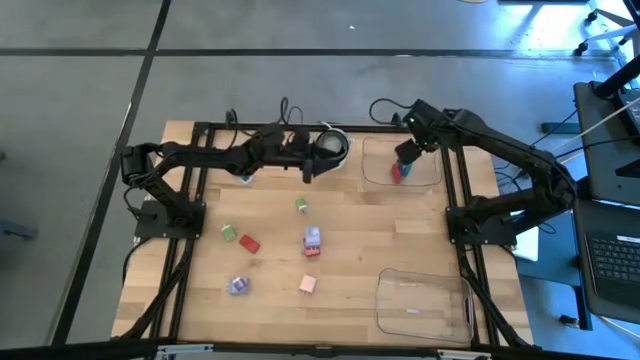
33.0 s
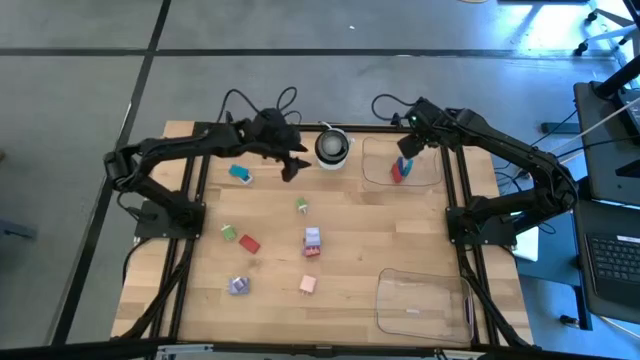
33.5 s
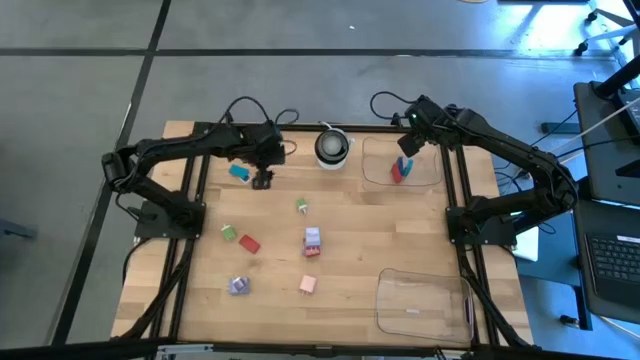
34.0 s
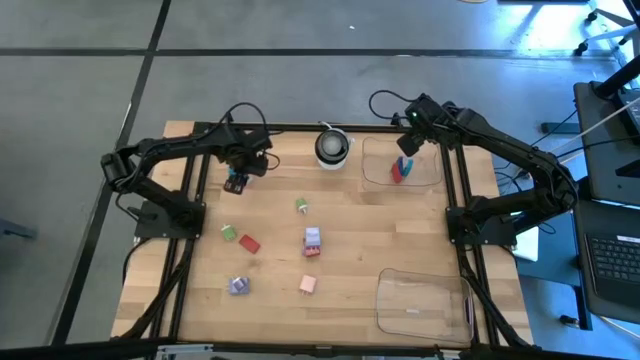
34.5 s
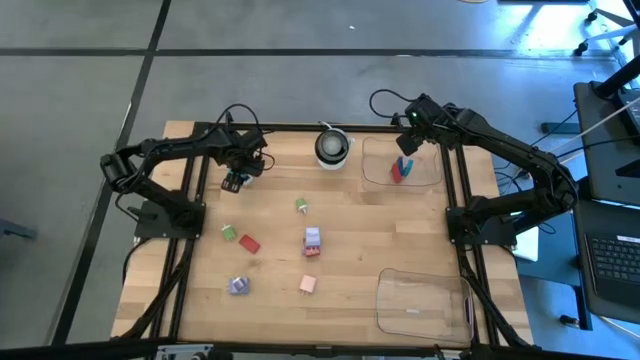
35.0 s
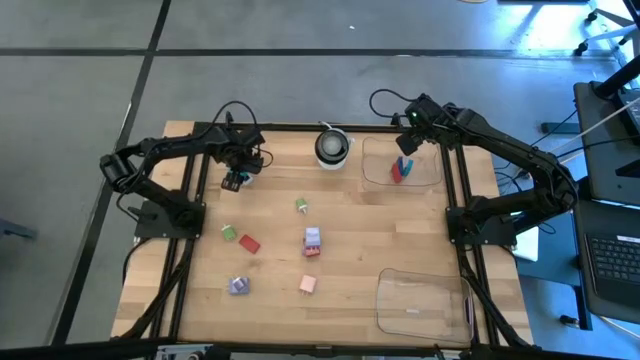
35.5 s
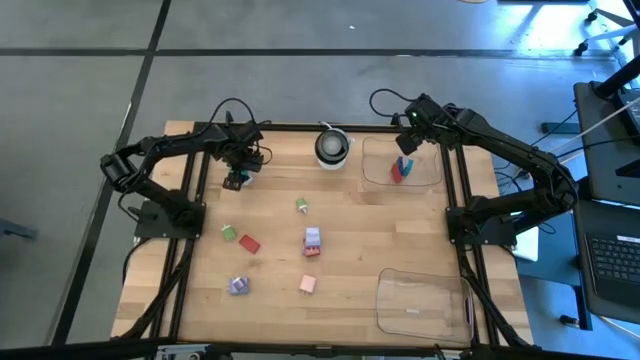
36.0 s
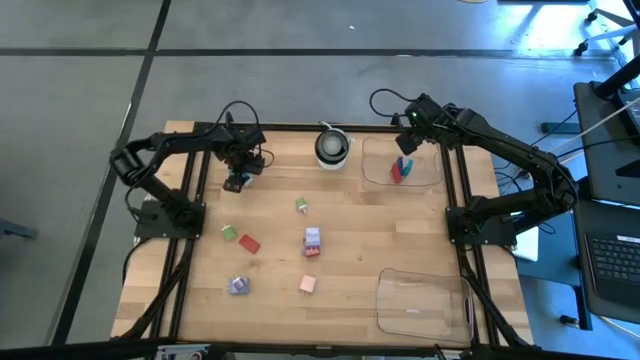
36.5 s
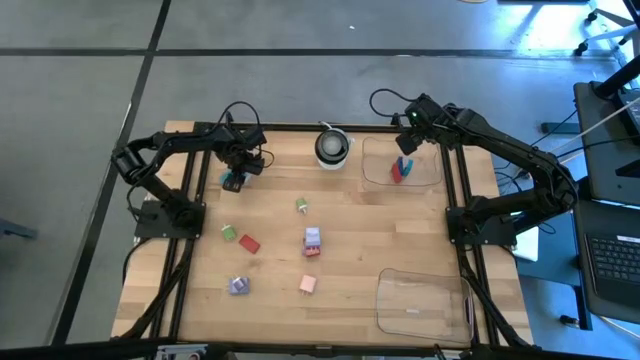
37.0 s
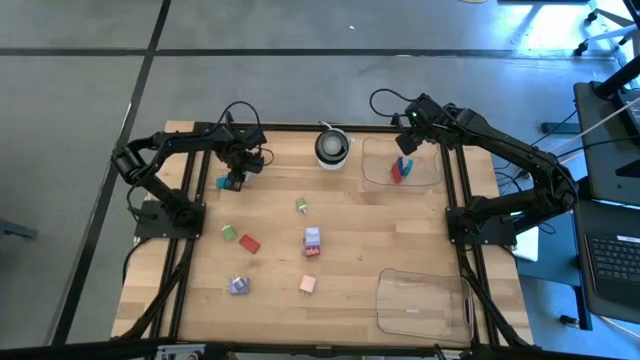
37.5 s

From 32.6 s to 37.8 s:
Task: Pick & Place Office items
Put the light blue digital timer into the top transparent bin

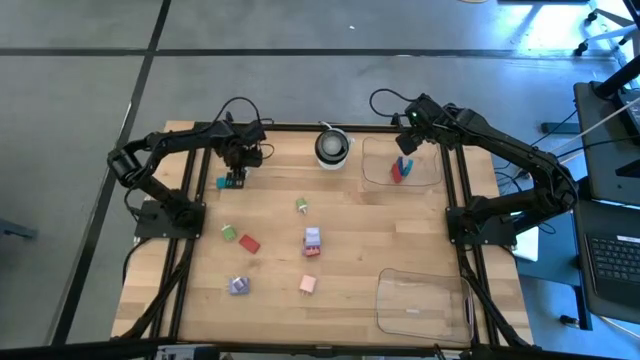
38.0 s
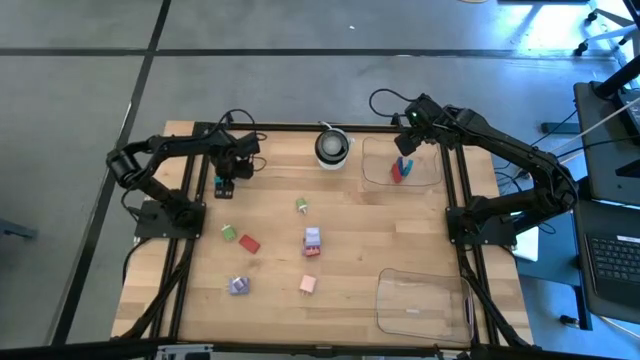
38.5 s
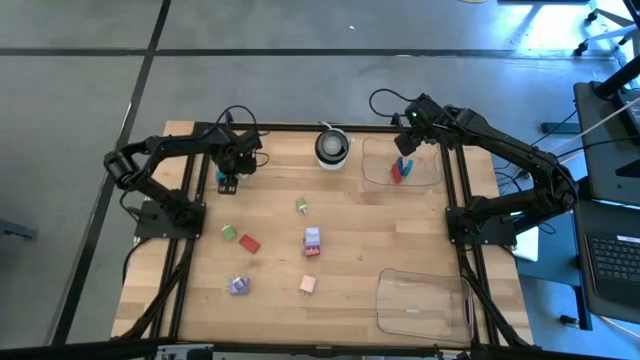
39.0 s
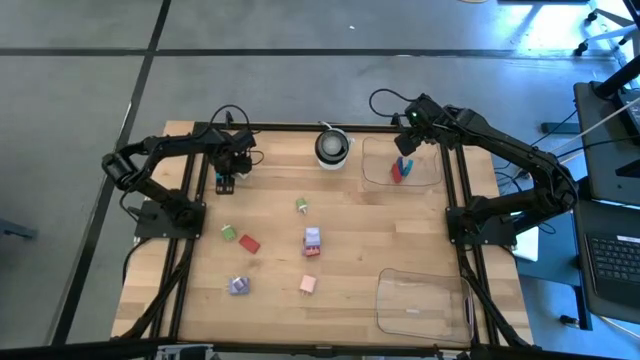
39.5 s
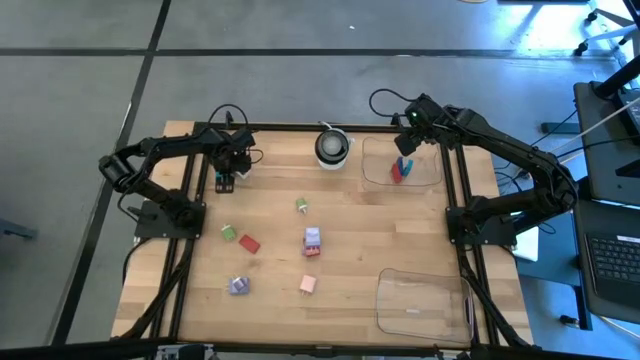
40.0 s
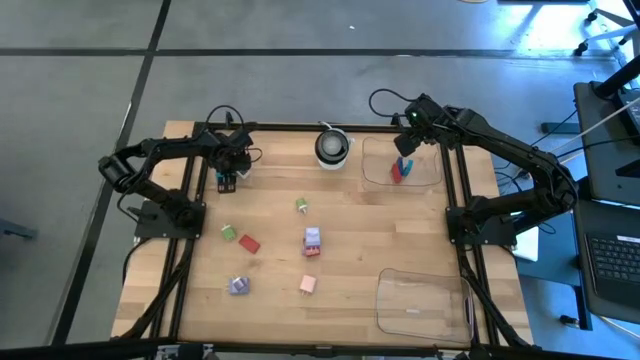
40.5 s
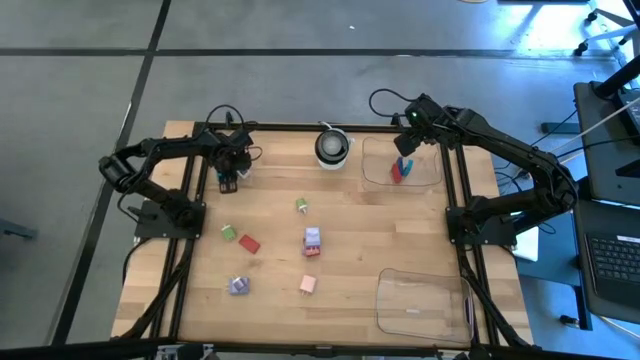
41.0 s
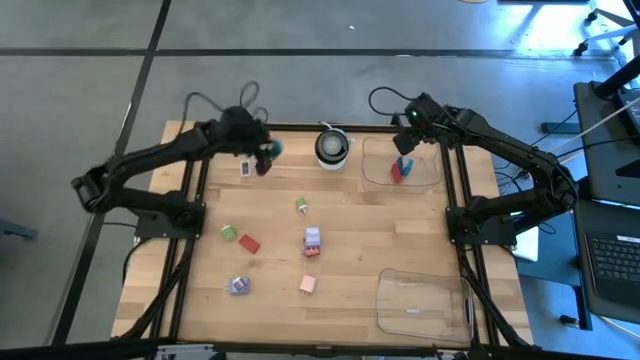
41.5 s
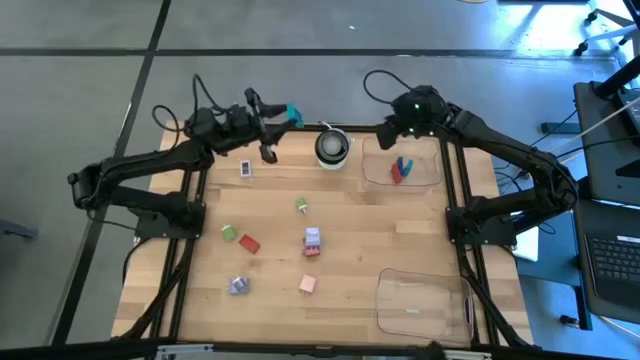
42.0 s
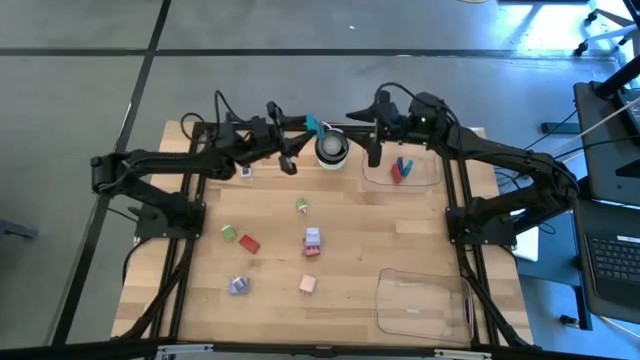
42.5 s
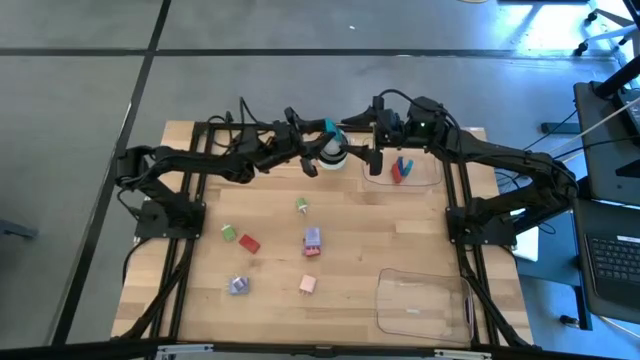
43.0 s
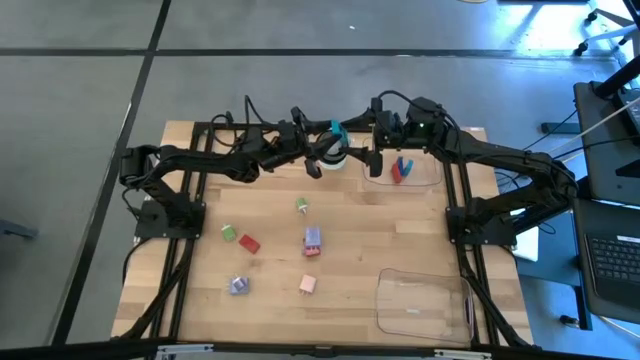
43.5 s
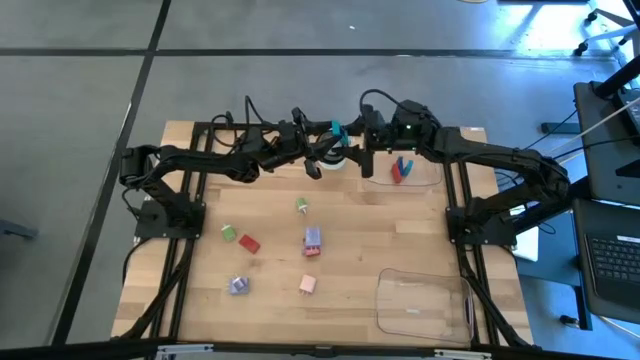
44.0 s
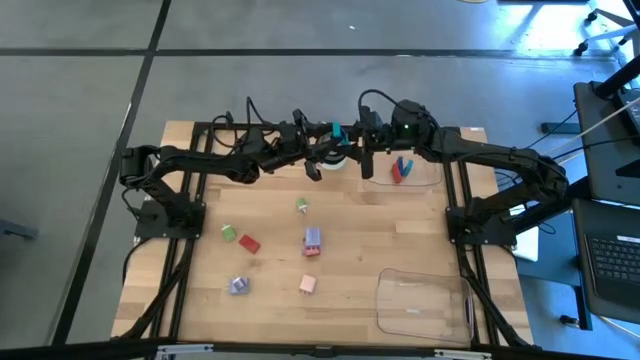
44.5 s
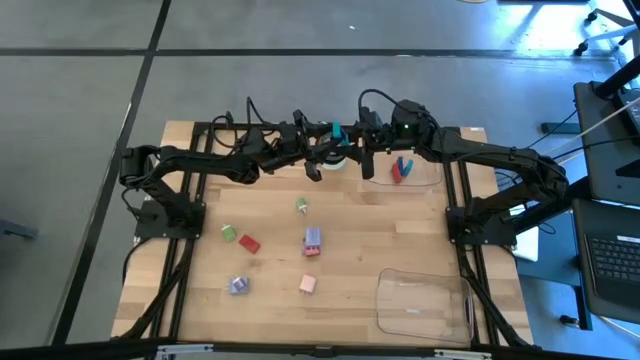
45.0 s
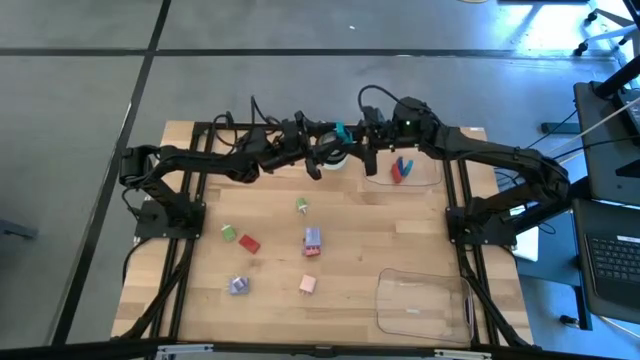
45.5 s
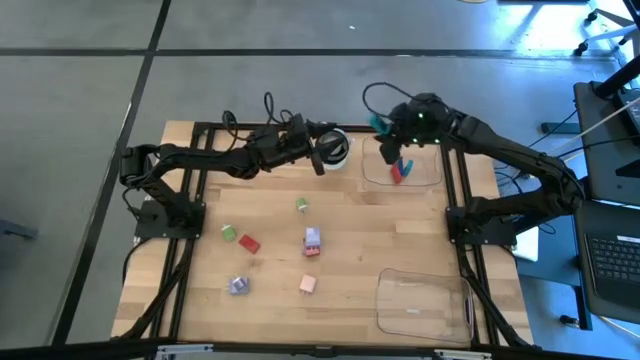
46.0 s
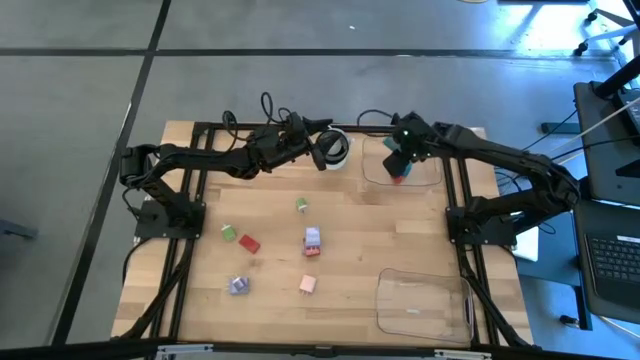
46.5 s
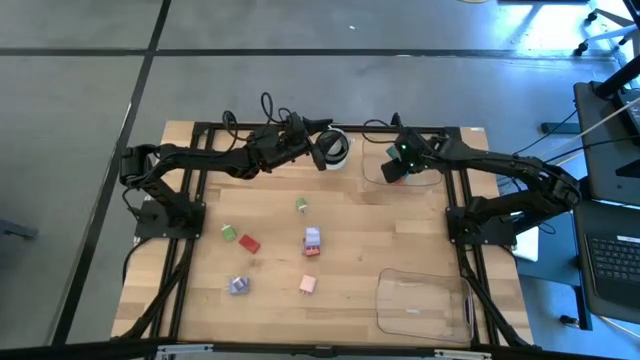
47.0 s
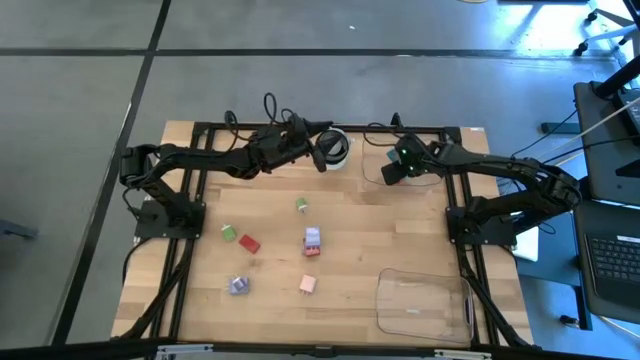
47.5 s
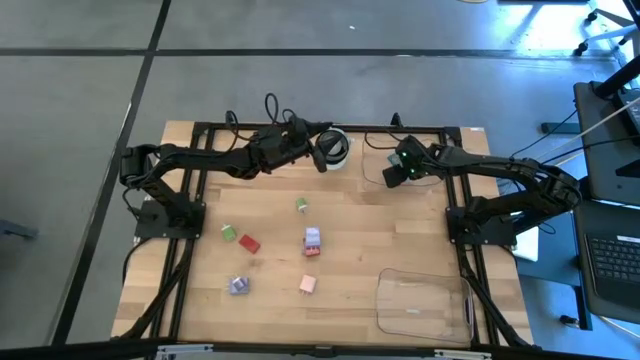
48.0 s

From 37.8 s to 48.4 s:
Put the light blue digital timer into the top transparent bin

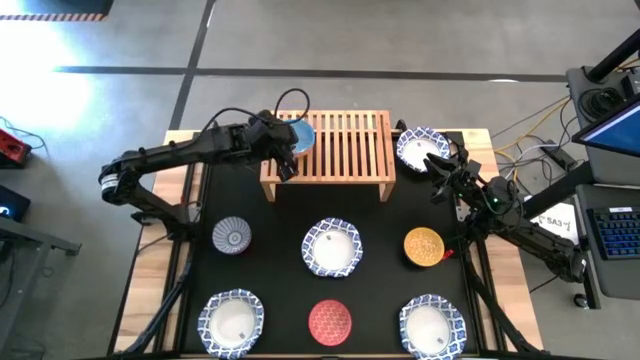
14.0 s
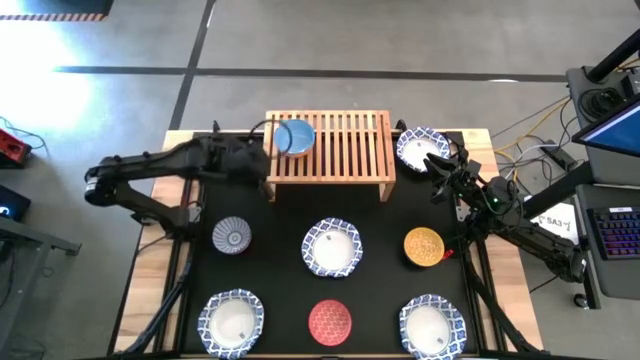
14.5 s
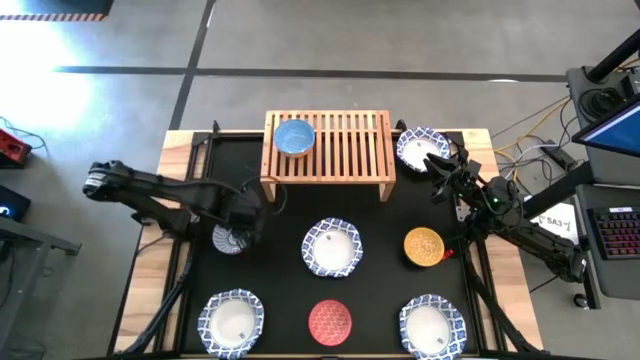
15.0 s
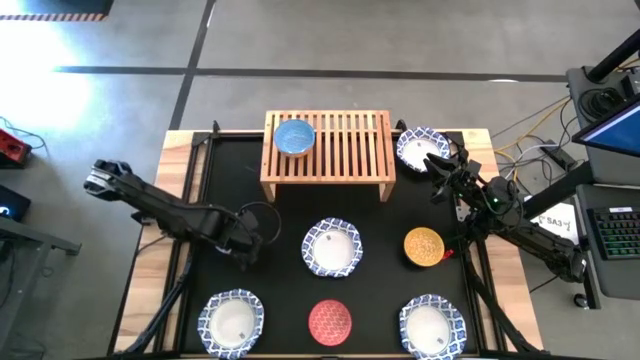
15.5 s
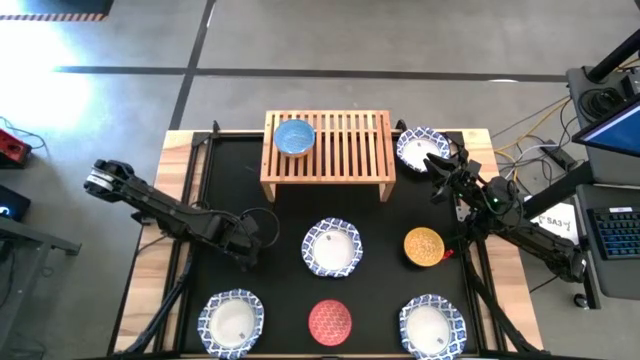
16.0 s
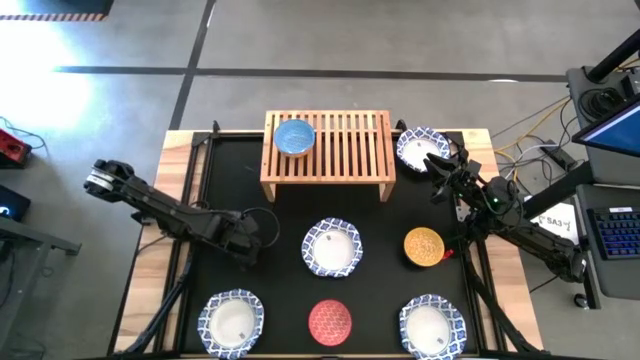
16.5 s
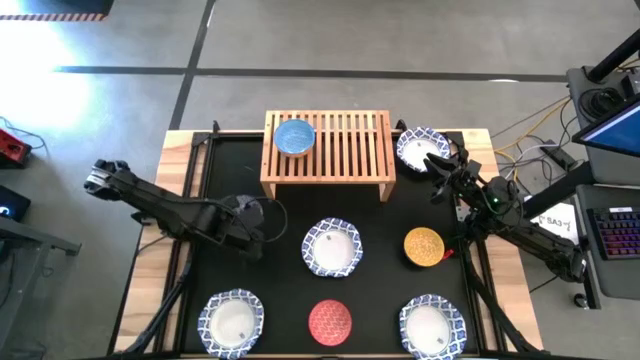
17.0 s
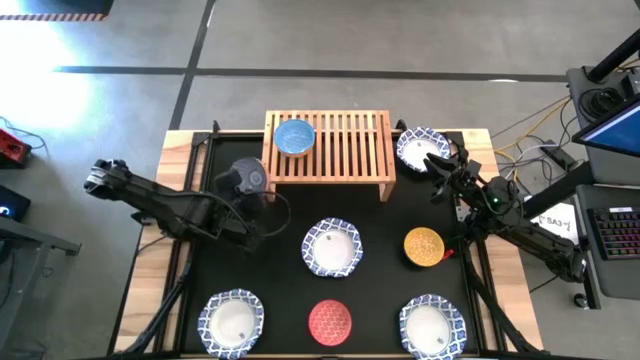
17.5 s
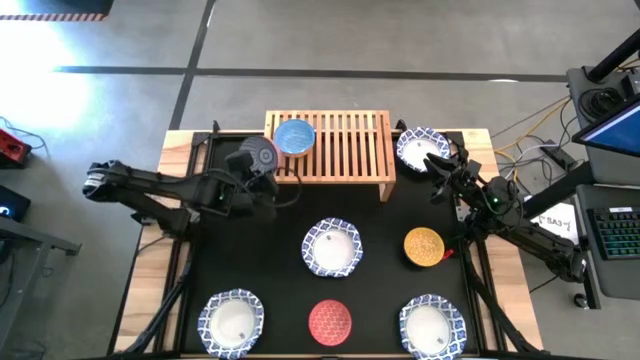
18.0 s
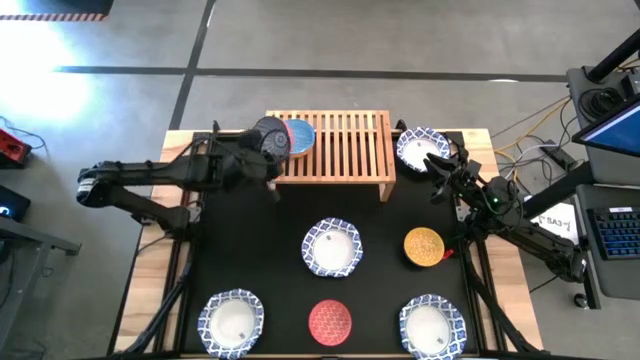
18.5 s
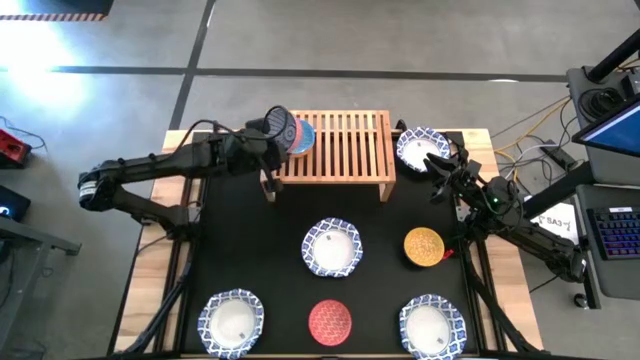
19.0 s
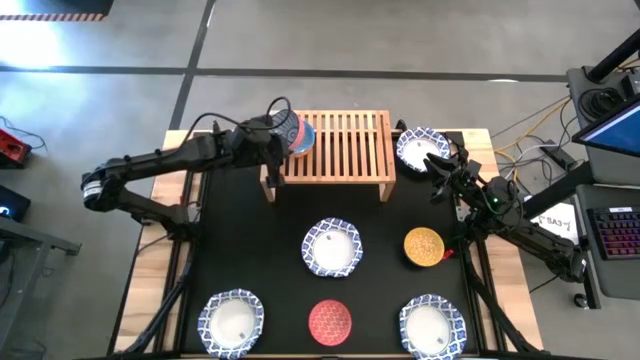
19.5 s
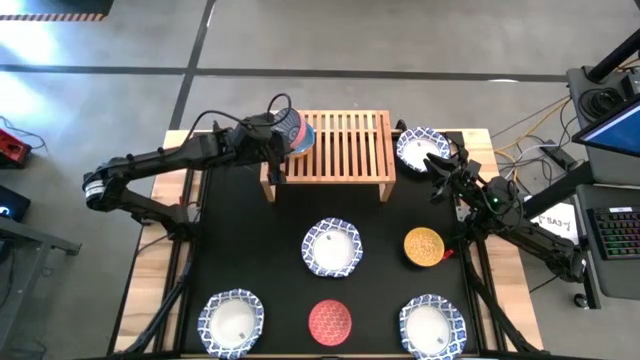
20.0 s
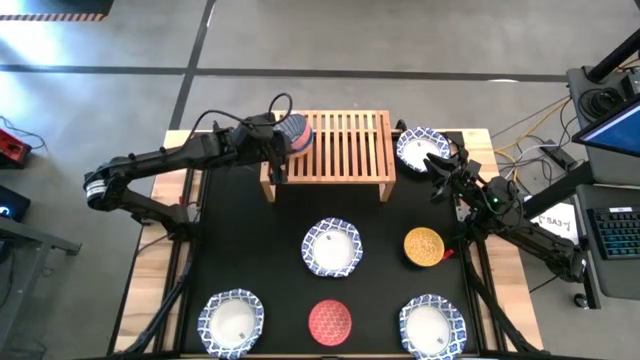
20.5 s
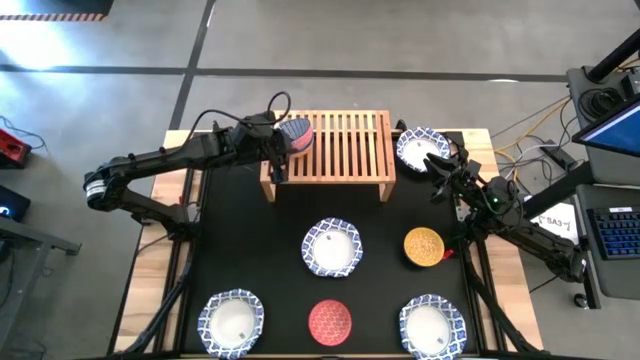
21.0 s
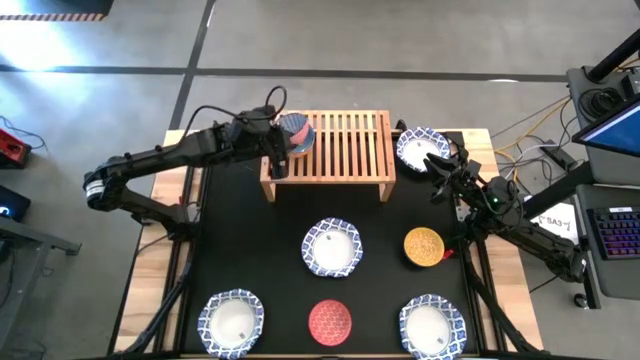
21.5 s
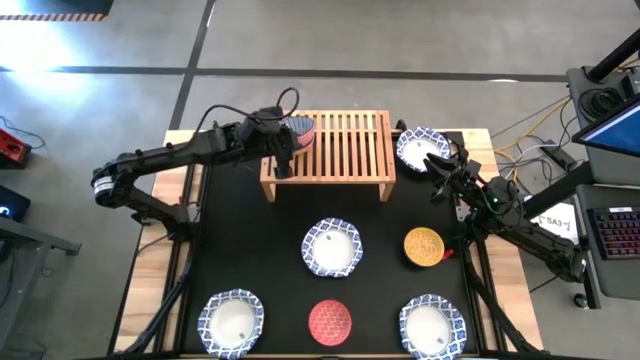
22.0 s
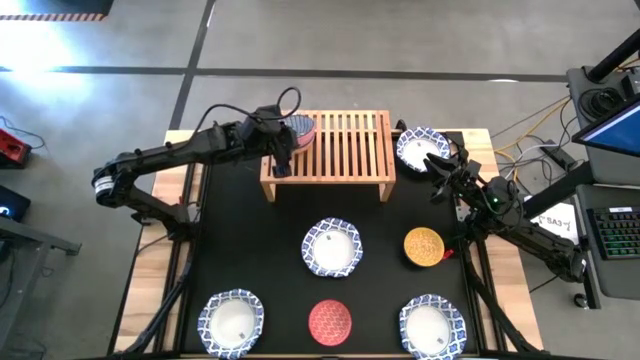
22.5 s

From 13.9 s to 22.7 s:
Task: Place and stack bowls onto a shelf
Stack the blue patterned bowl on top of the blue bowl on the shelf
